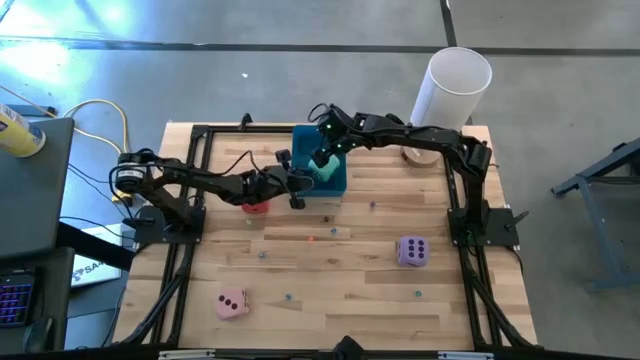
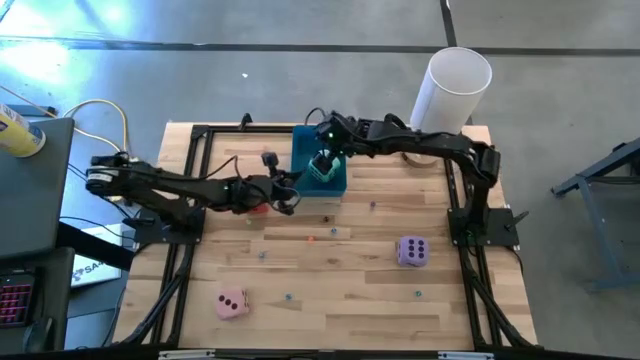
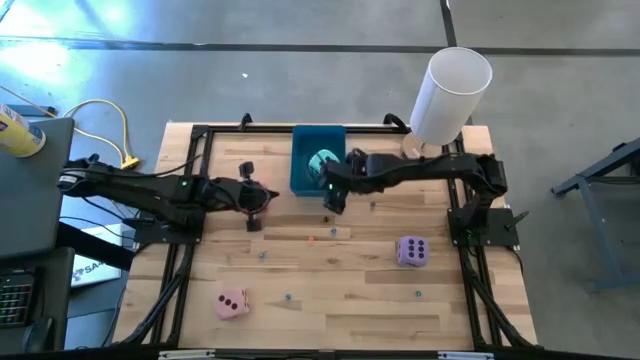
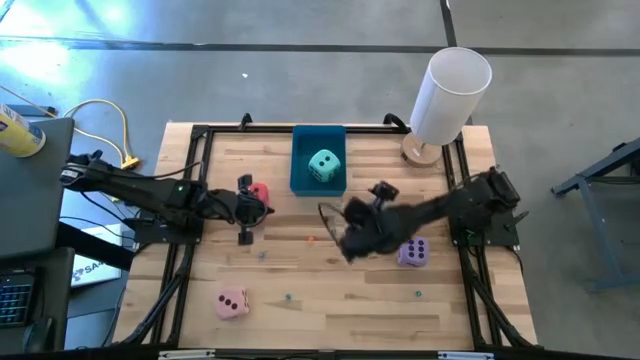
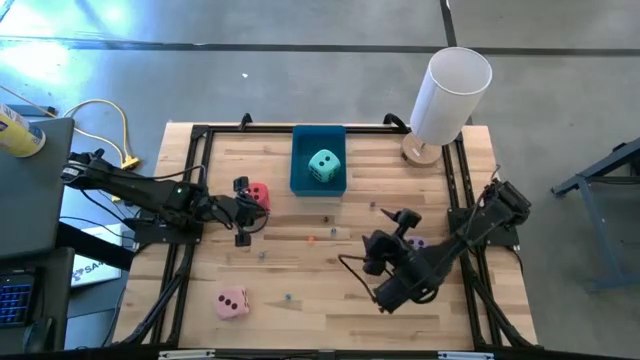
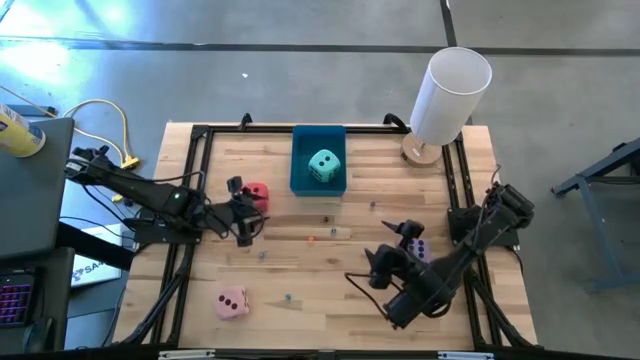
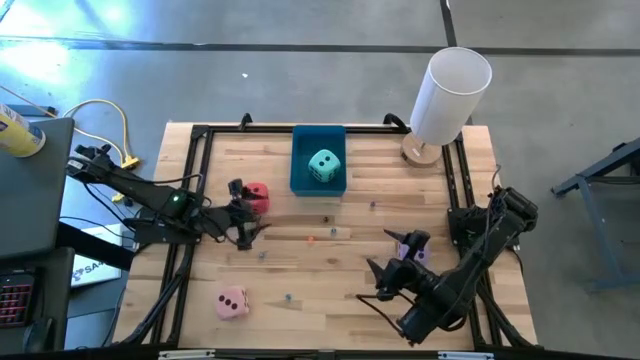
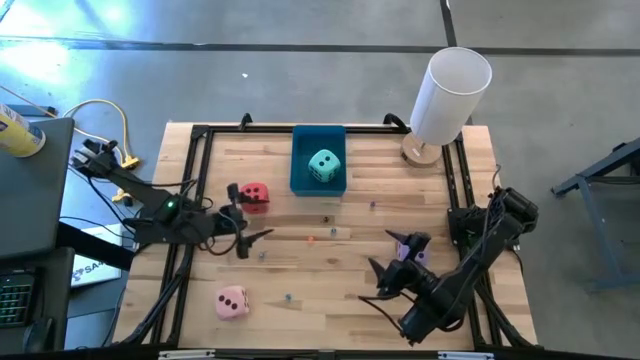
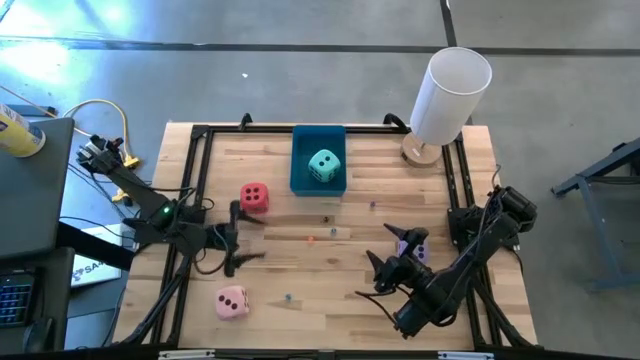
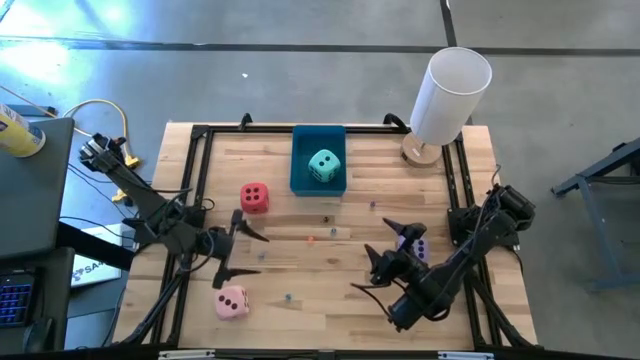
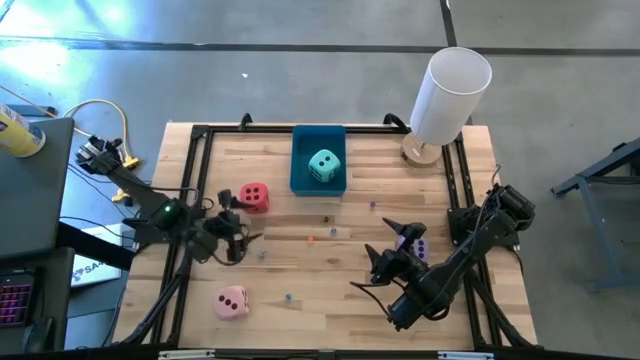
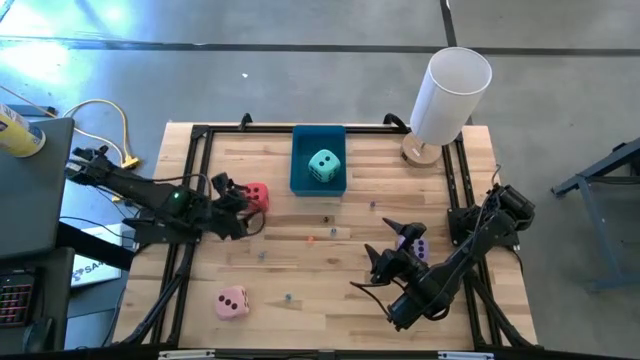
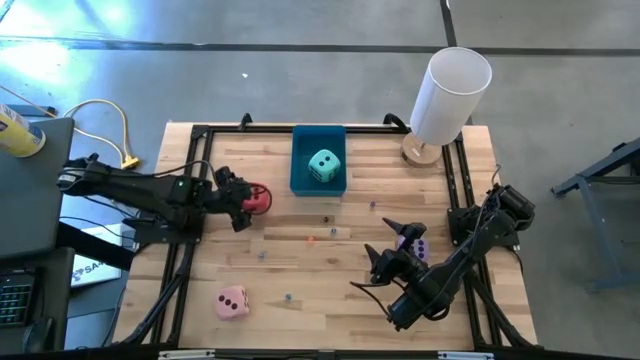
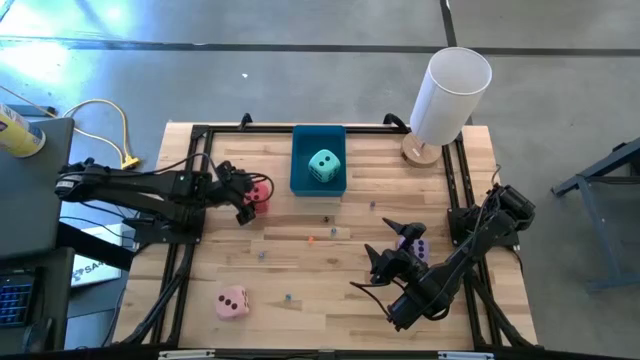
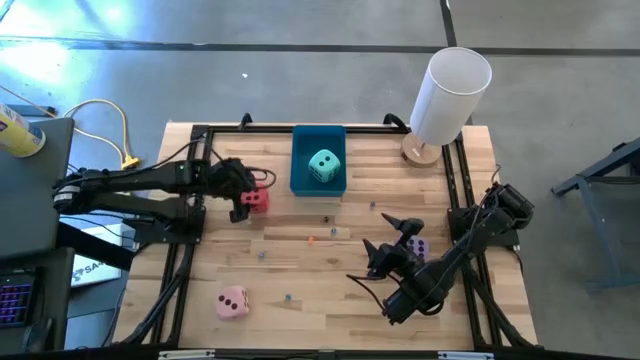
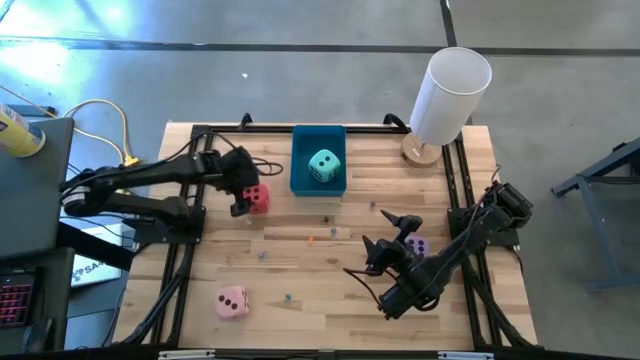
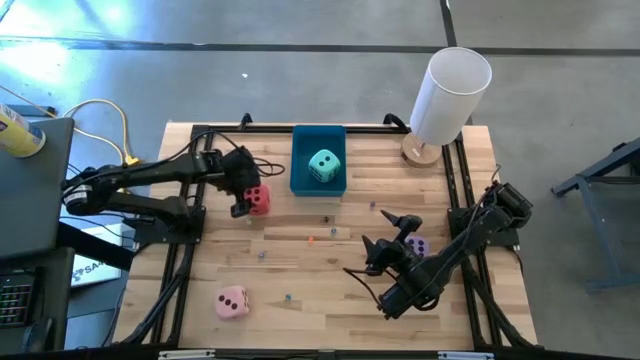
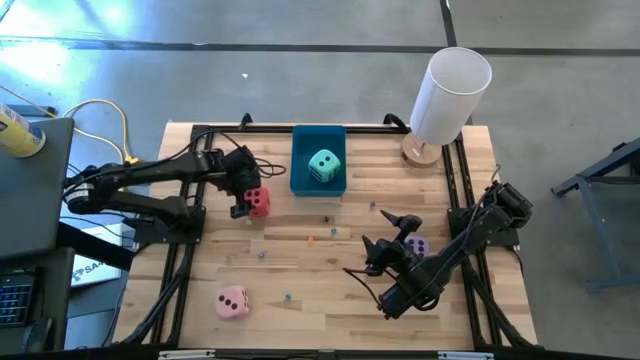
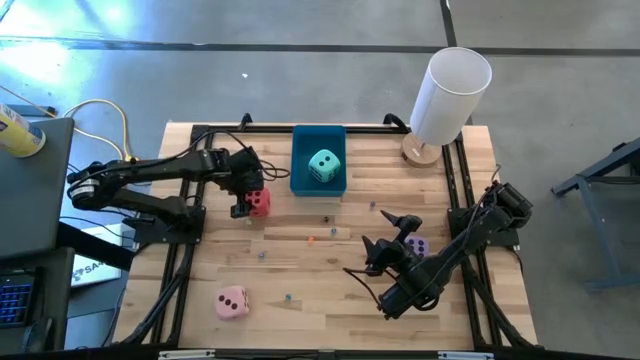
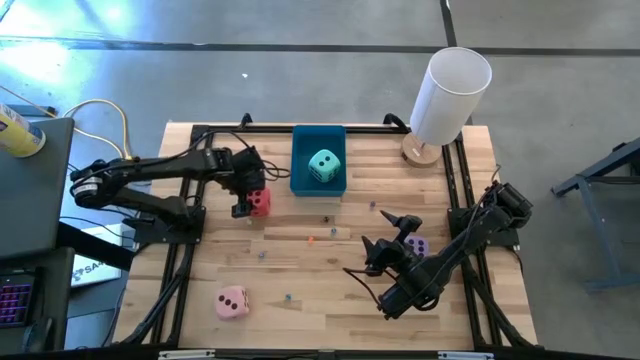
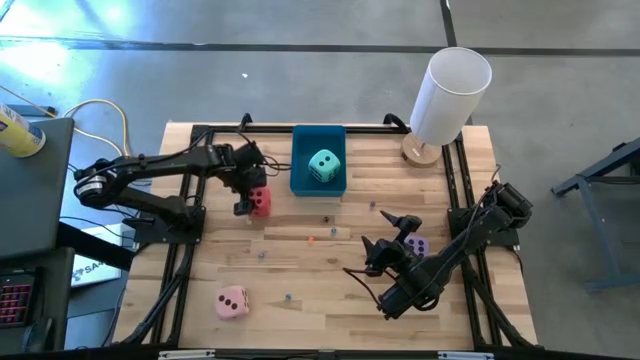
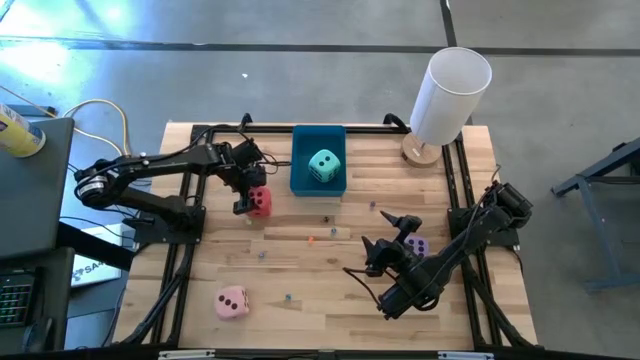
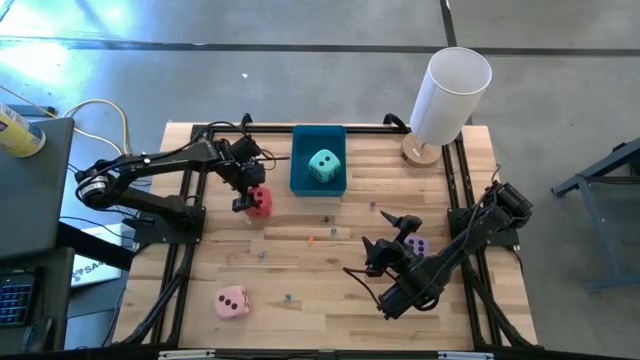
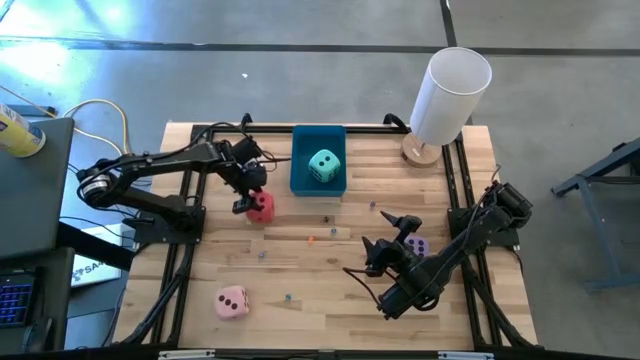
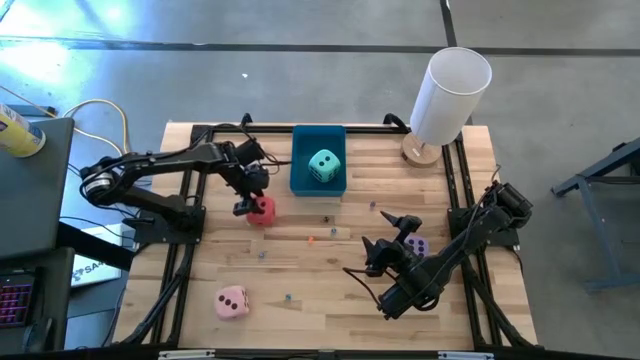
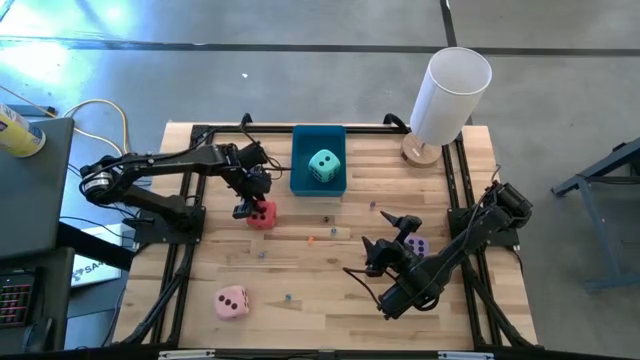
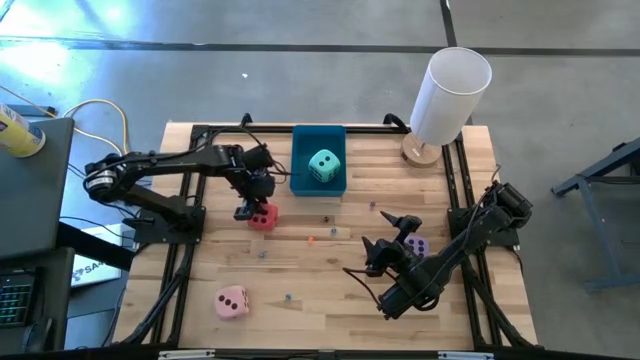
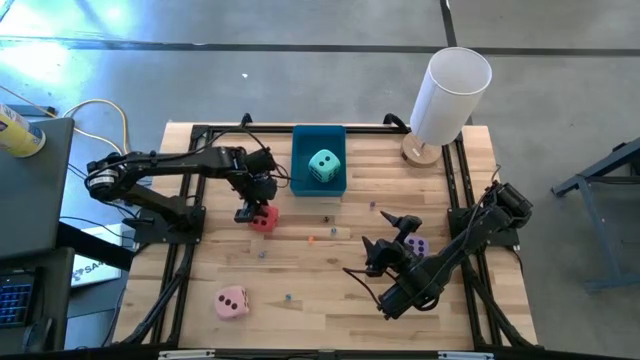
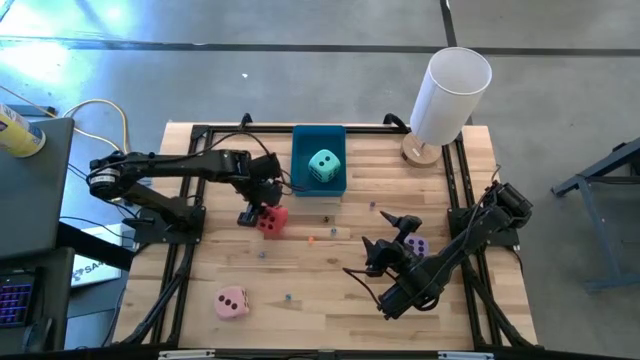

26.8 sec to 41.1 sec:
Task: Pick & Place Dice
Put the red die into the blue bin

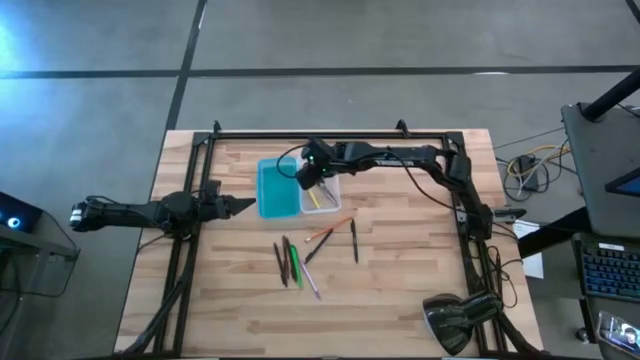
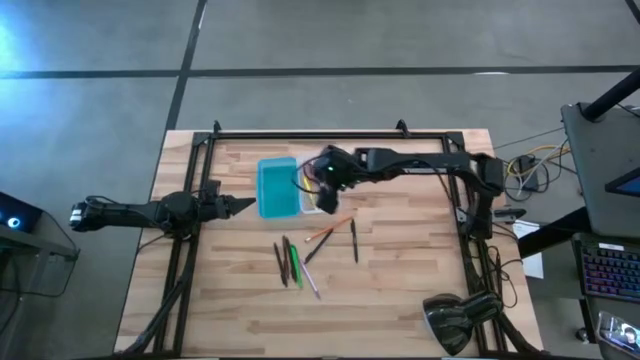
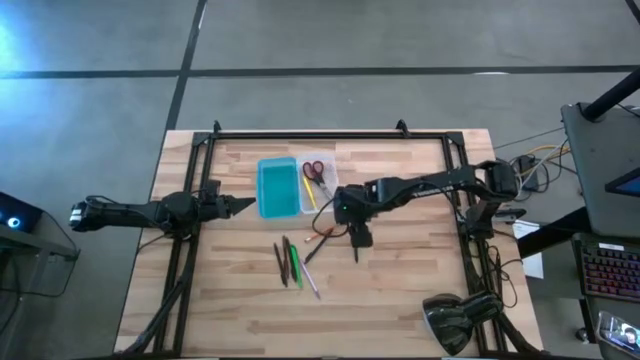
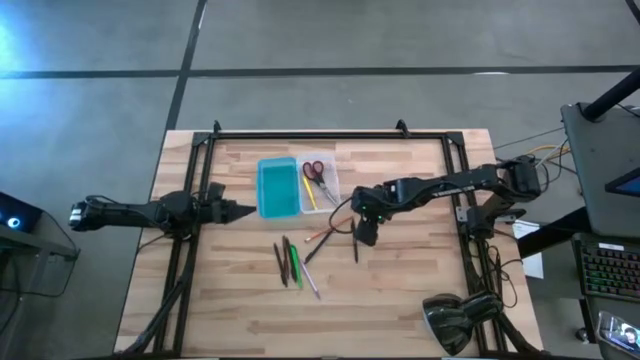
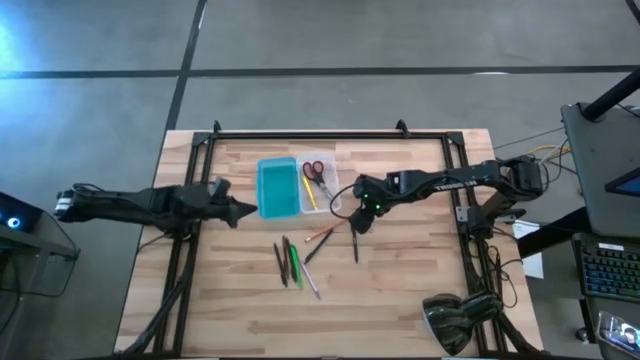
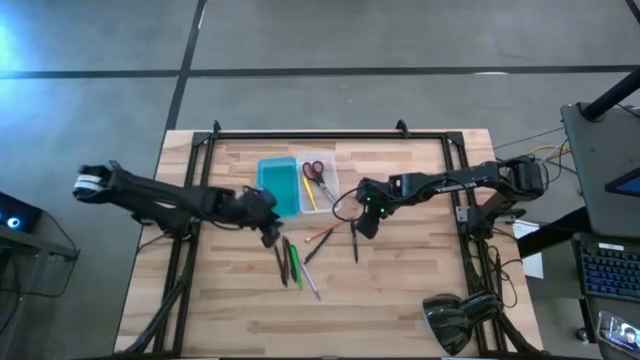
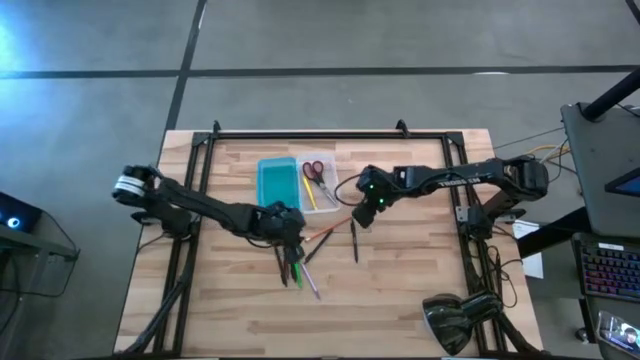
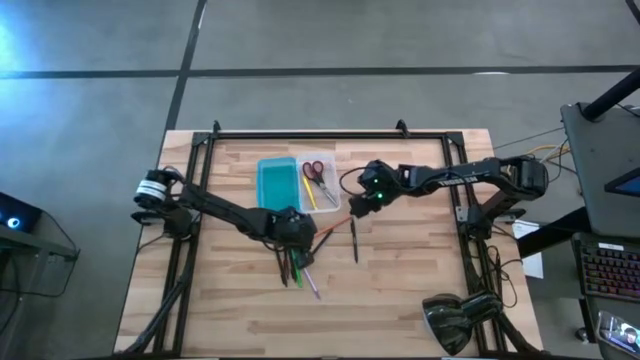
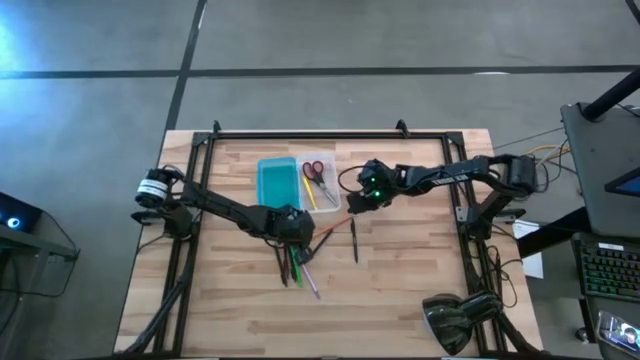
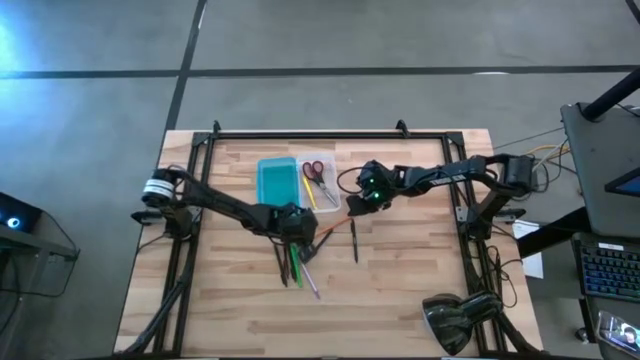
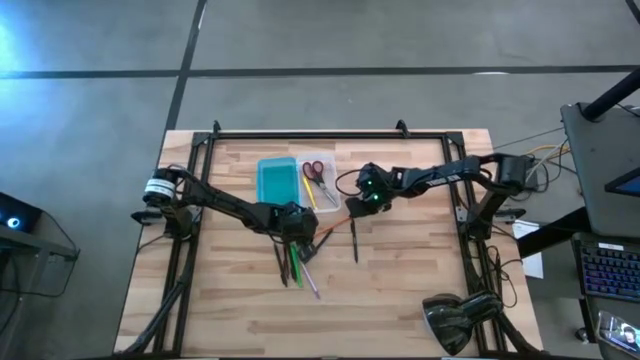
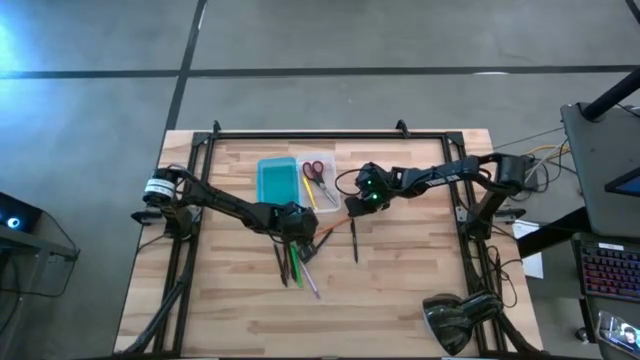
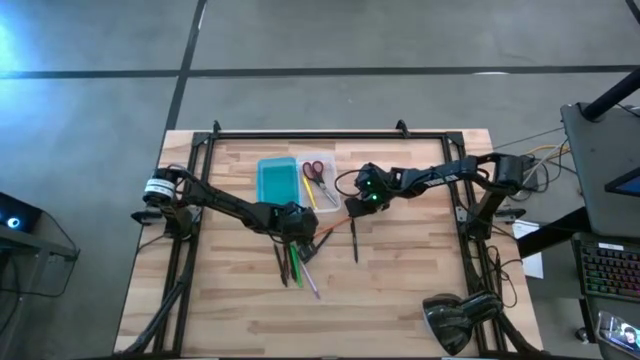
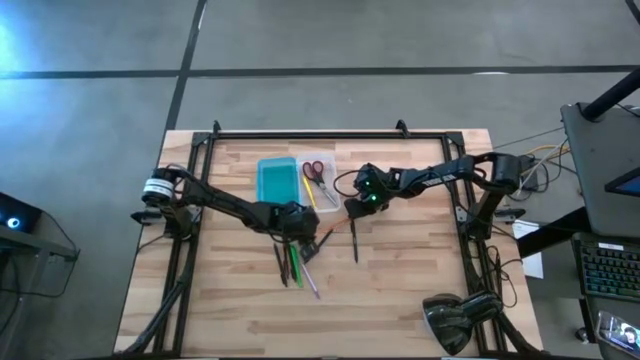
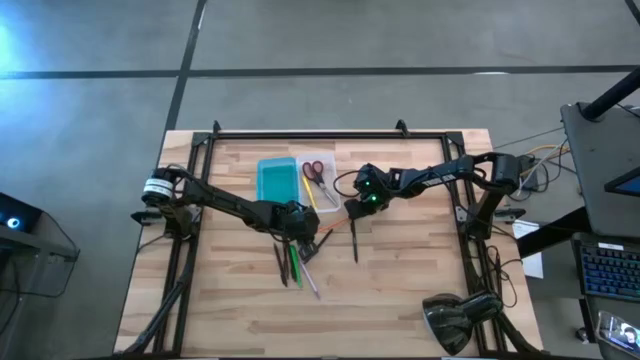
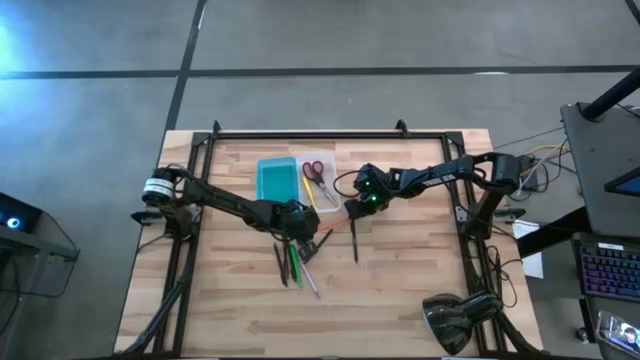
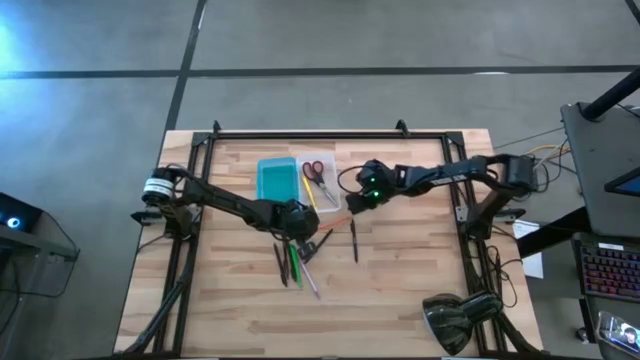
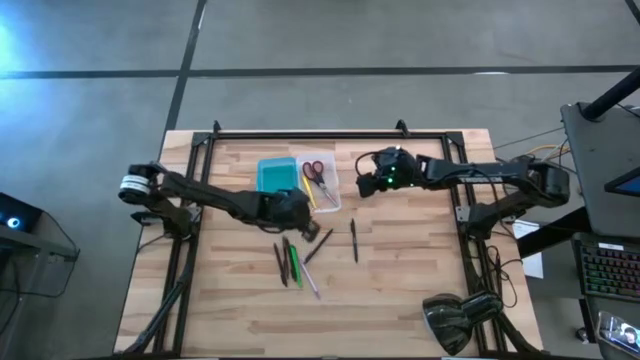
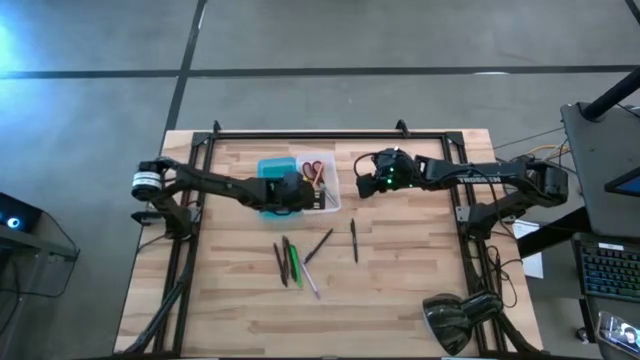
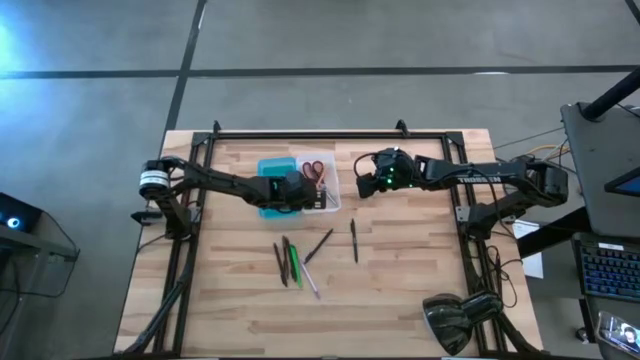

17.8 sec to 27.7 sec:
Task: Pick & place school supplies into a supply box
Put the orange pencil into the pencil box
